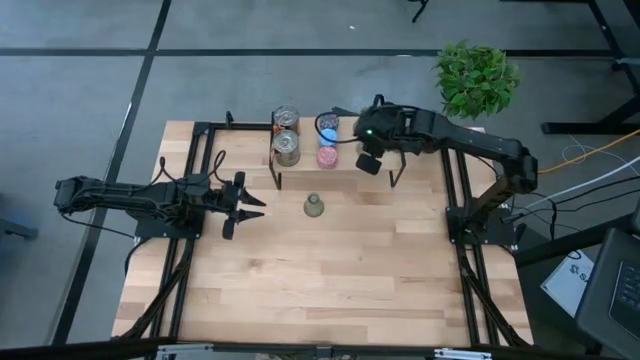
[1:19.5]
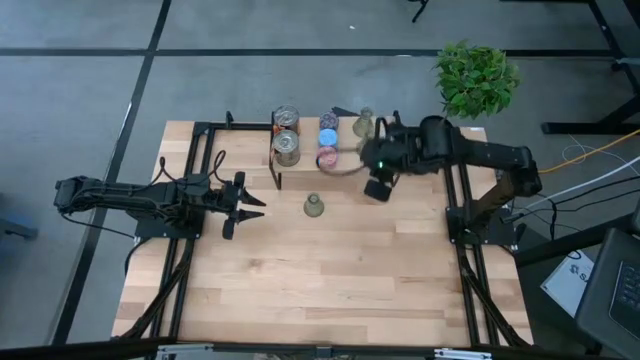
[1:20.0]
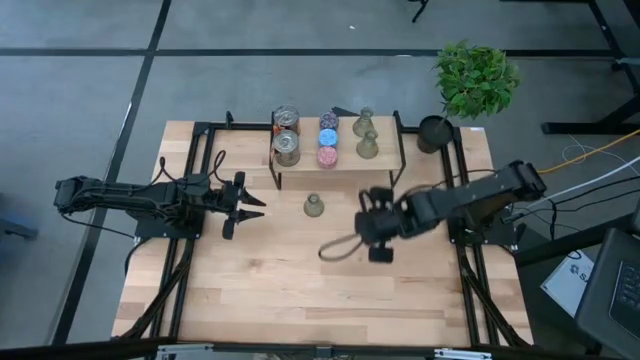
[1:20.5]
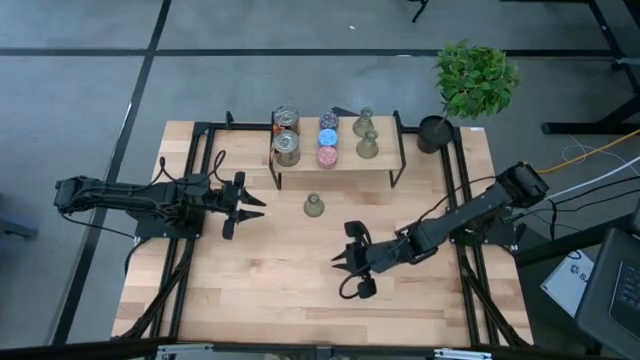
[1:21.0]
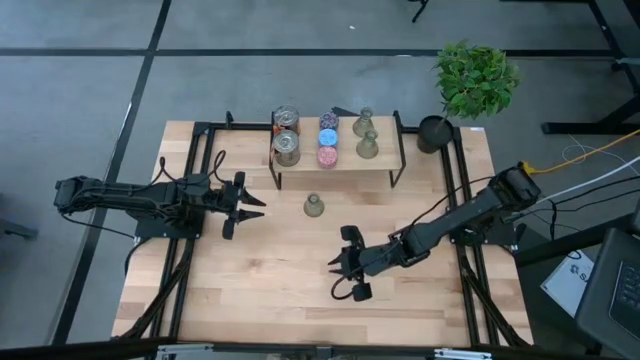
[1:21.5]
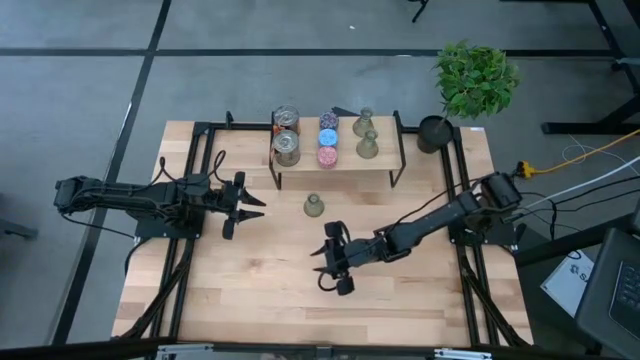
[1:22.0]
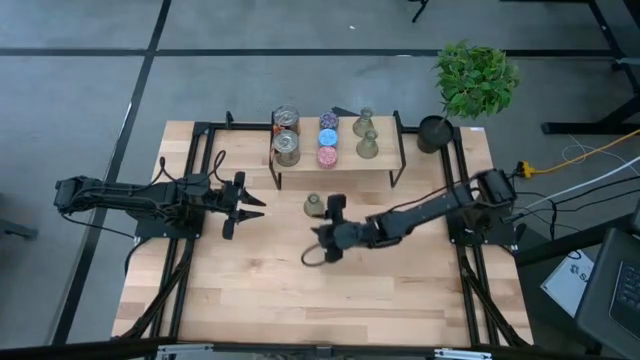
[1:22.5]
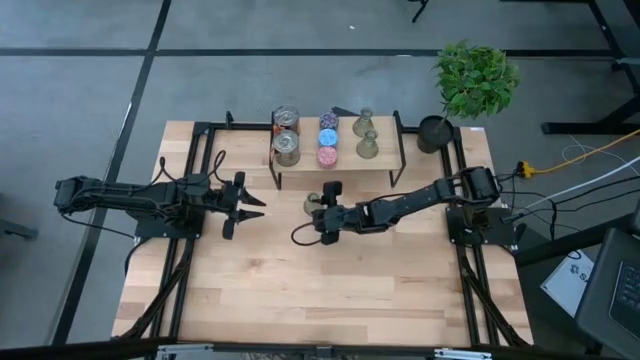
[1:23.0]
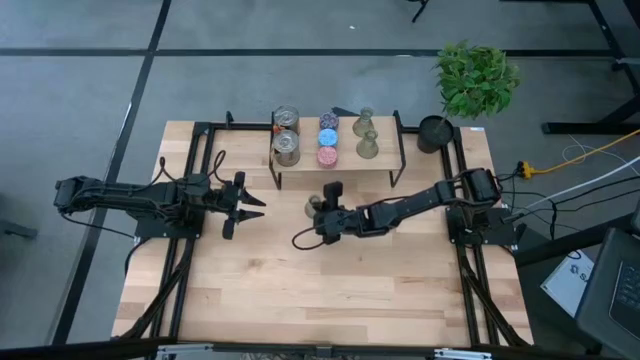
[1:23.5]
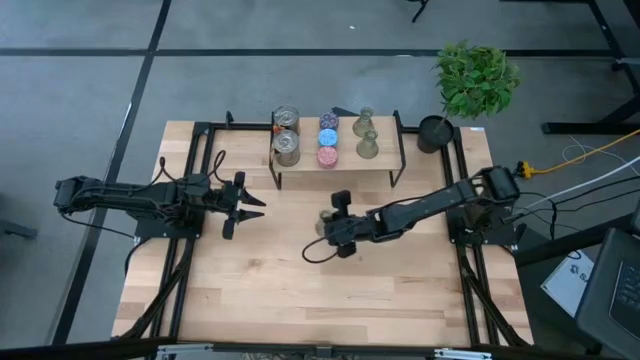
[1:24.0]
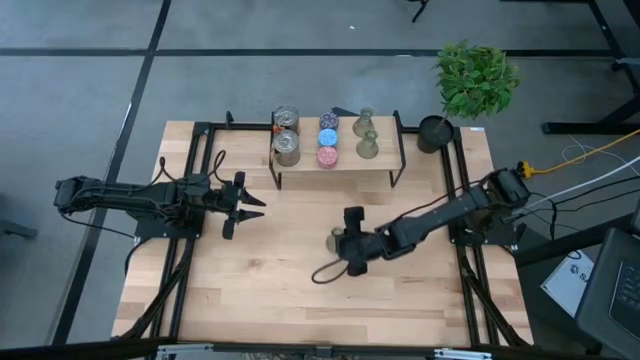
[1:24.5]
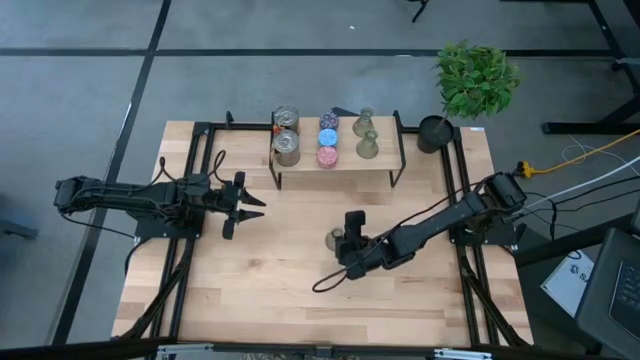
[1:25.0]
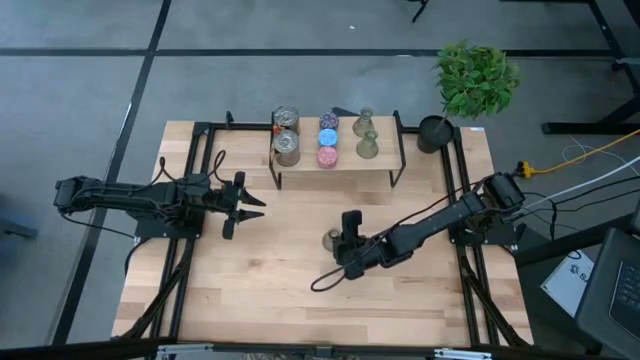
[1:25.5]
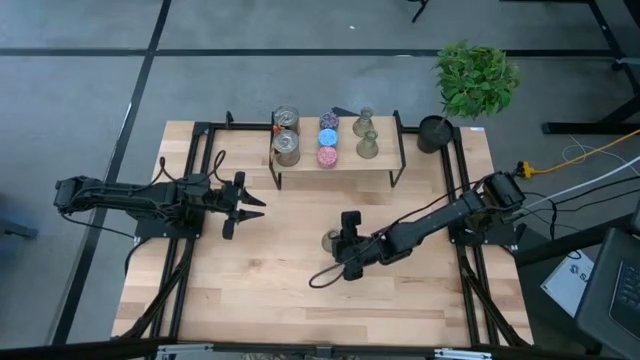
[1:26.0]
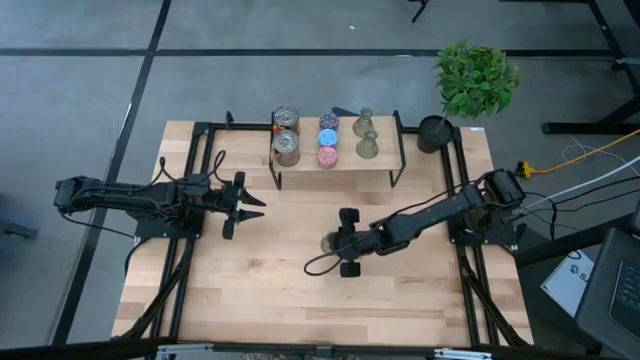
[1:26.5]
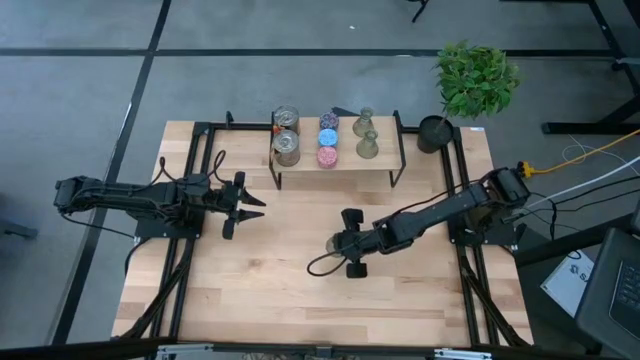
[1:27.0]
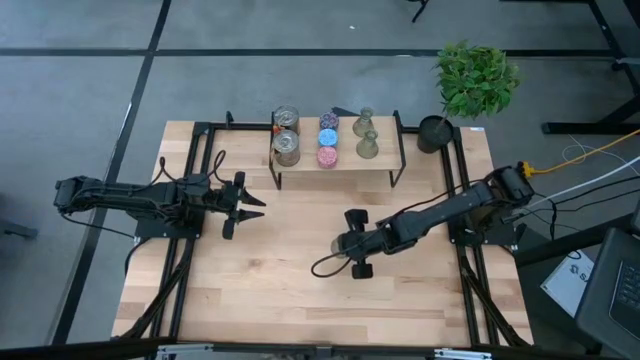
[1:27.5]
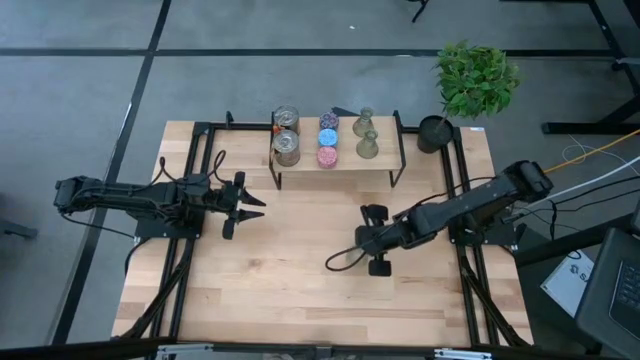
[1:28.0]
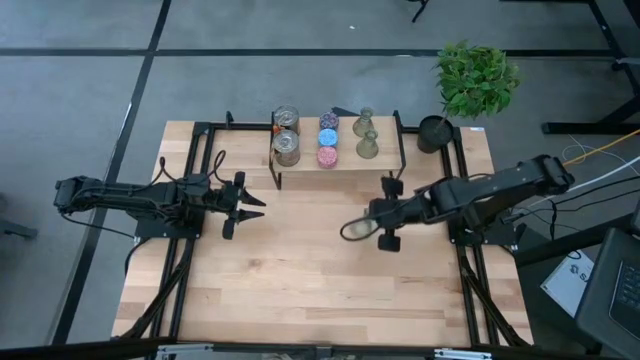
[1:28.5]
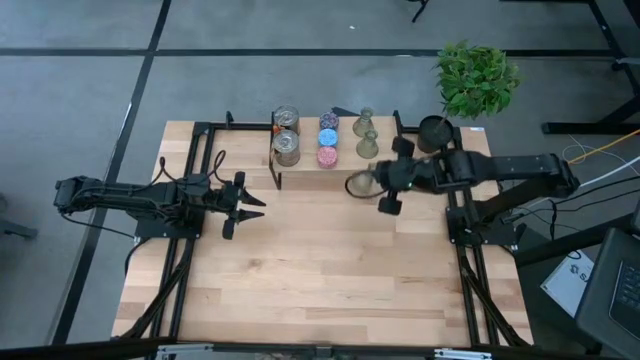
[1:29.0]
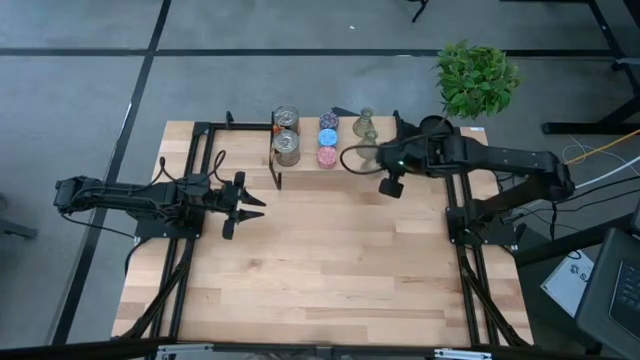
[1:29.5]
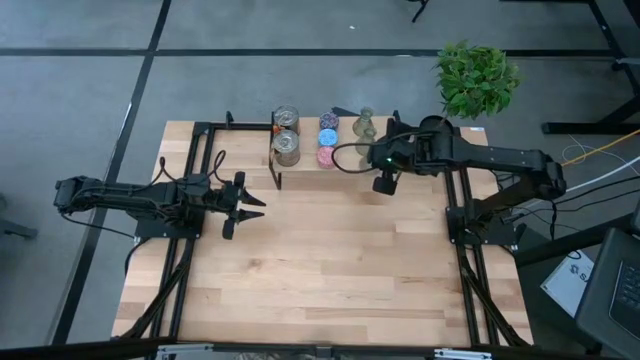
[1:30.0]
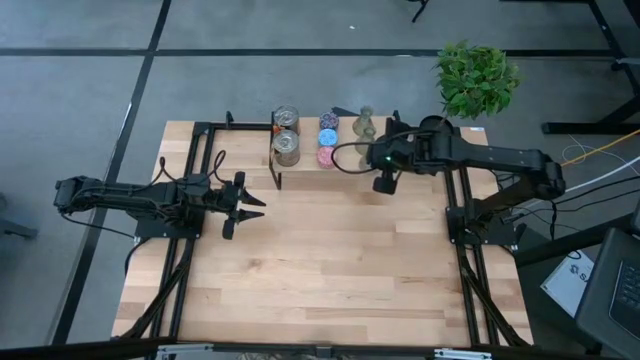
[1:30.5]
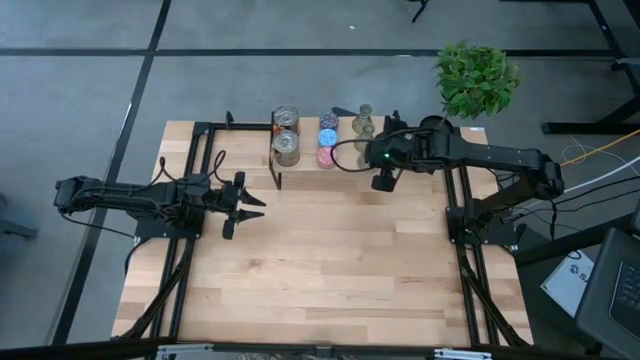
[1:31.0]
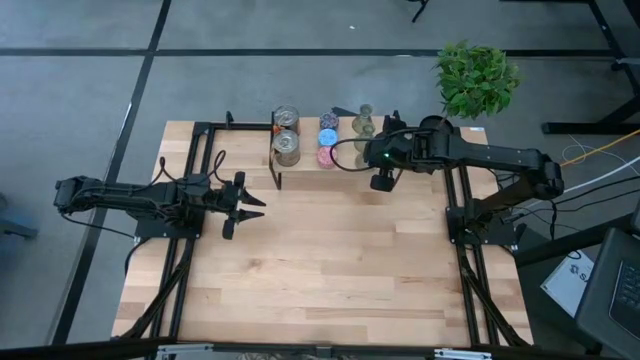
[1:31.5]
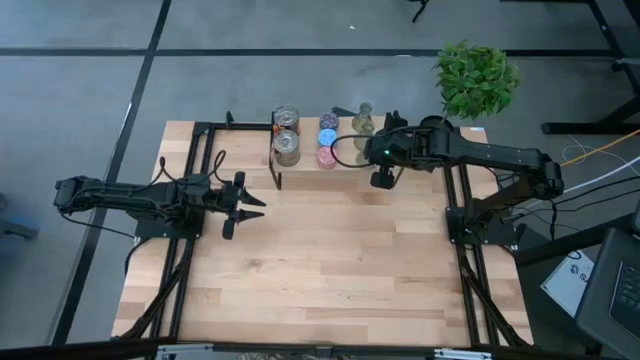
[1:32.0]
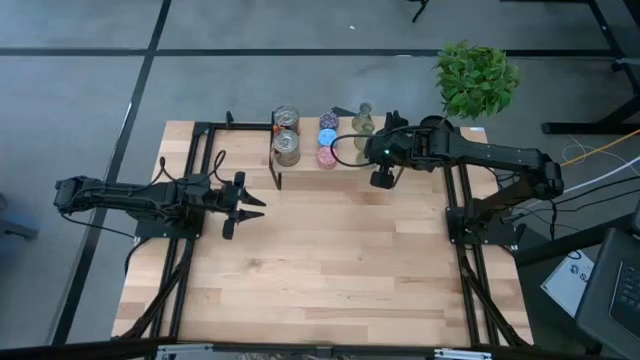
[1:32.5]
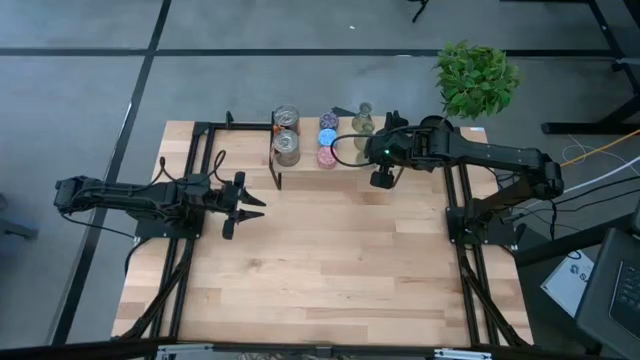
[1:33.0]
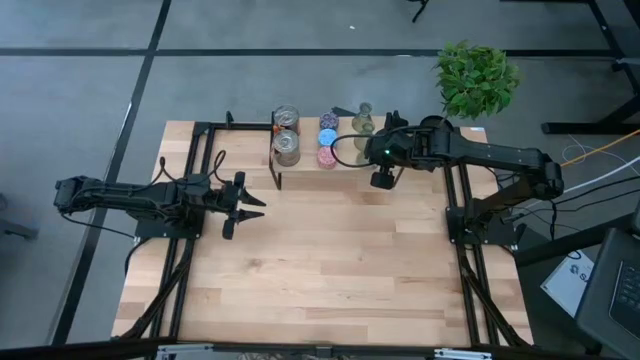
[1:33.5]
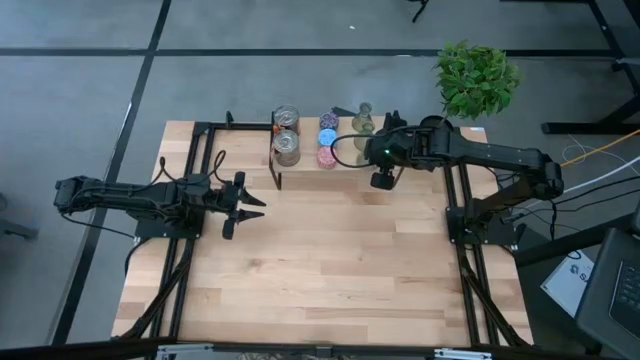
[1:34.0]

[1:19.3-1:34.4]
Task: Pick & Place candle stick holders
Put the green glass candle holder on the shelf aligned with the other green glass candle holders

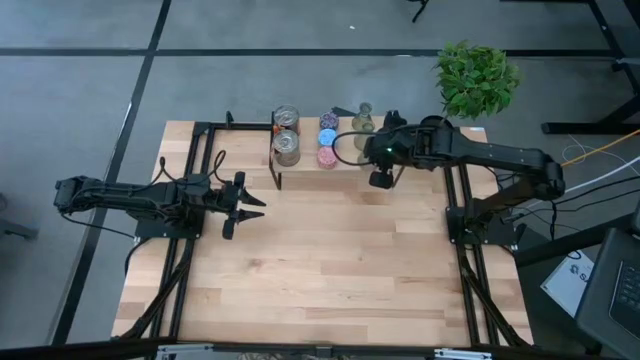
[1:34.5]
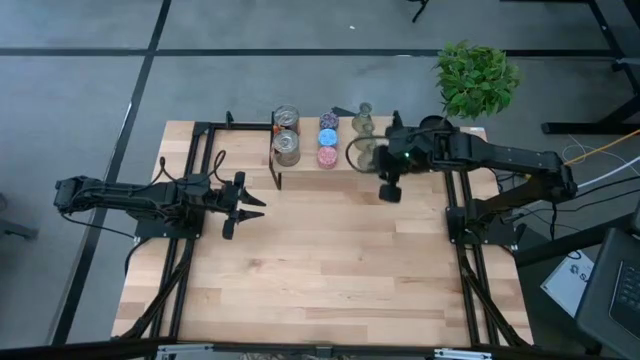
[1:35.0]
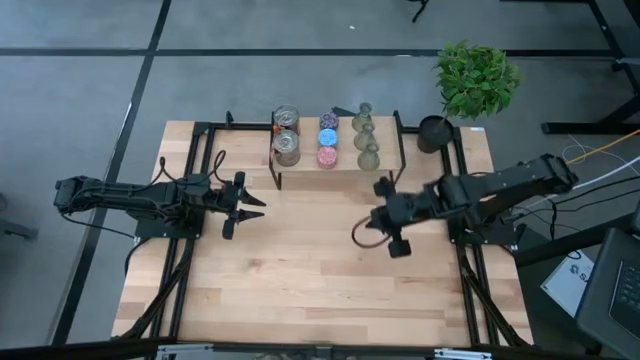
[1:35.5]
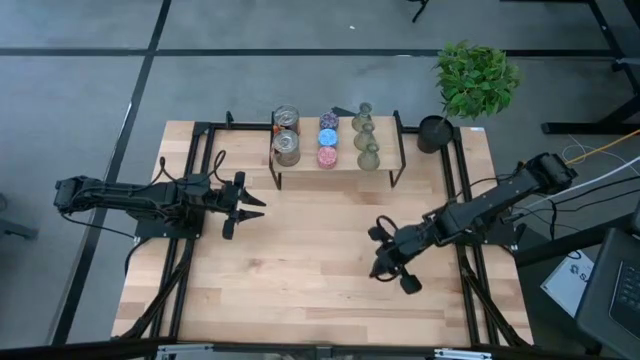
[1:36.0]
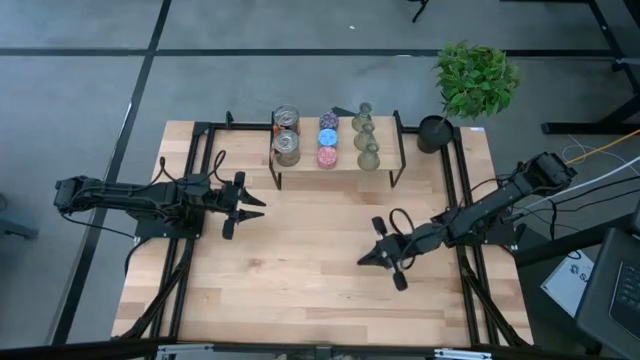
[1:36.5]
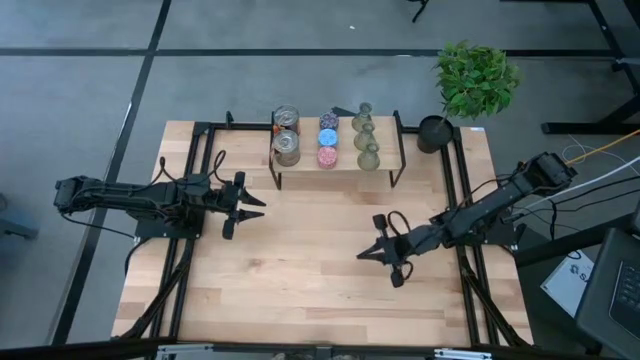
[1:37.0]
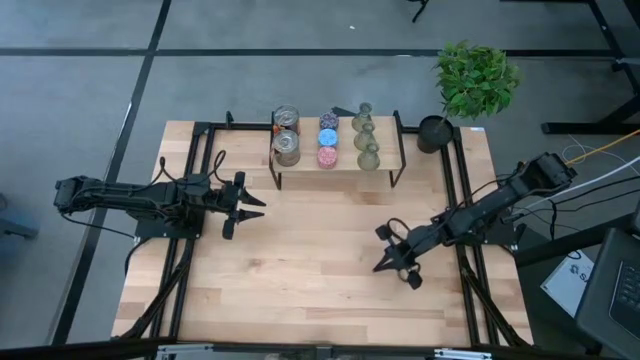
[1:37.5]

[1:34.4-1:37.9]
Return to Home Position

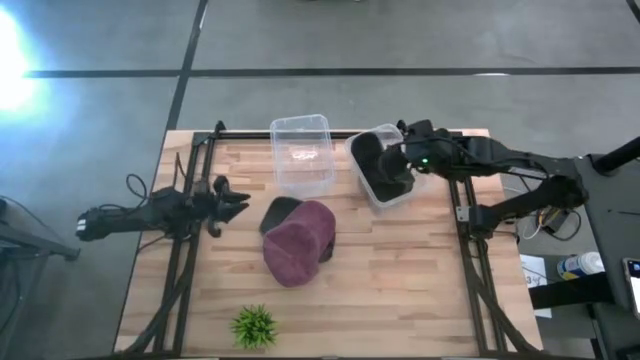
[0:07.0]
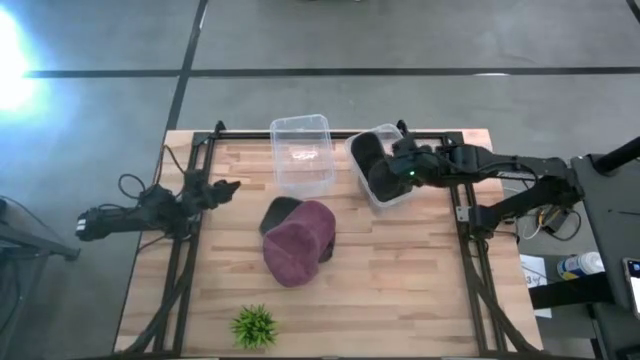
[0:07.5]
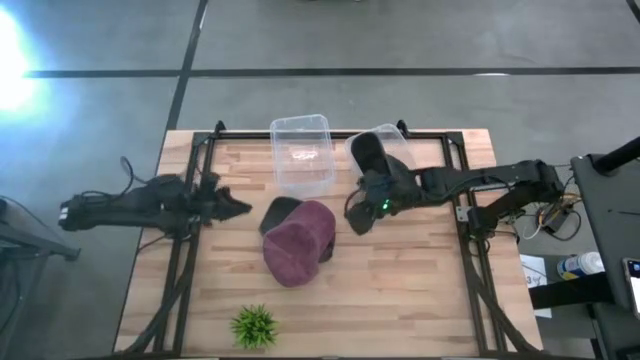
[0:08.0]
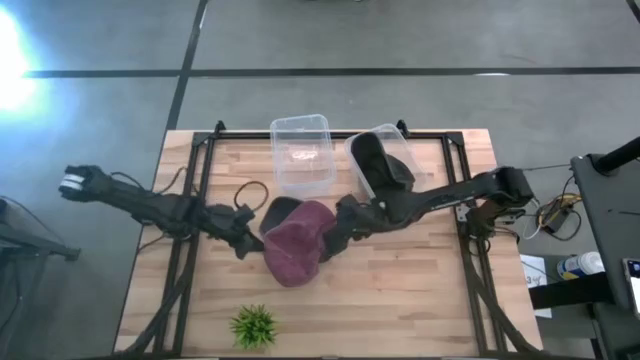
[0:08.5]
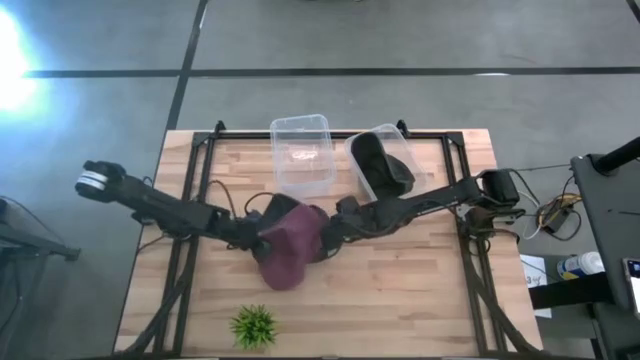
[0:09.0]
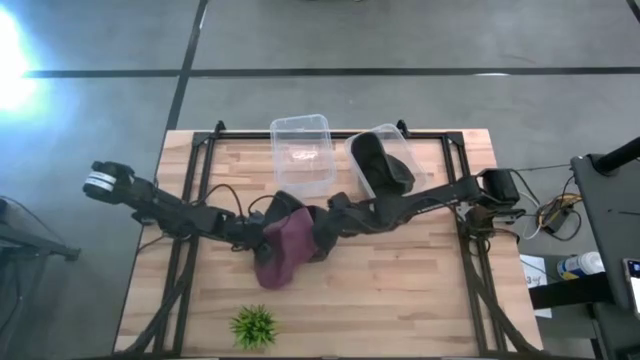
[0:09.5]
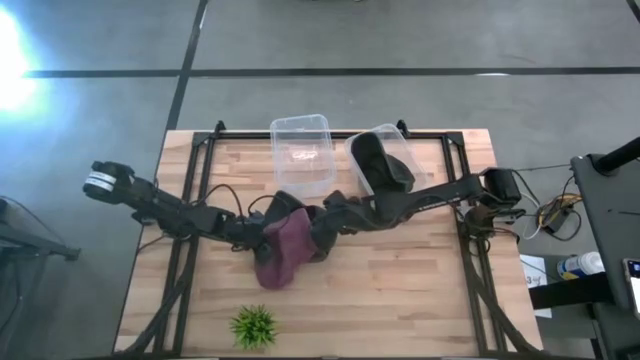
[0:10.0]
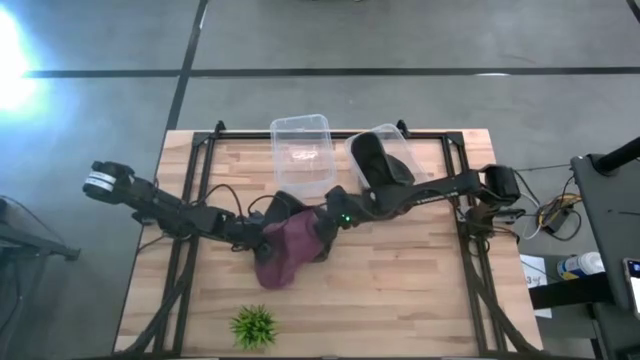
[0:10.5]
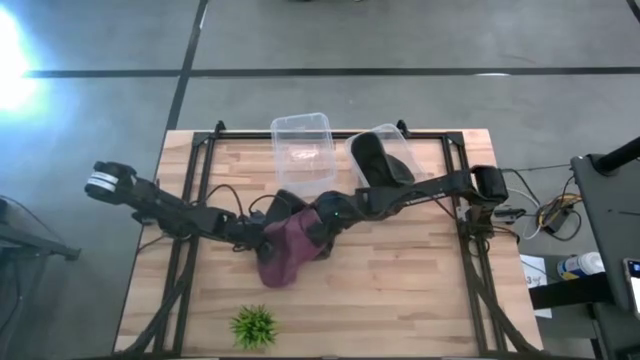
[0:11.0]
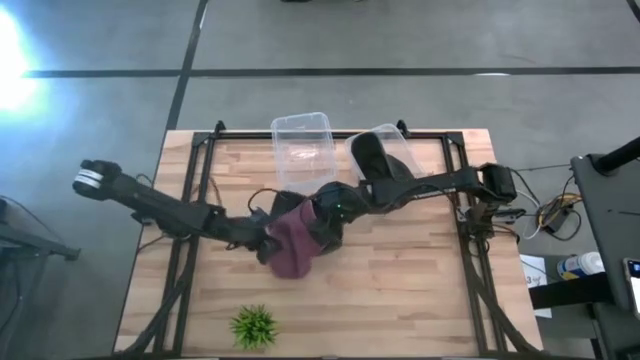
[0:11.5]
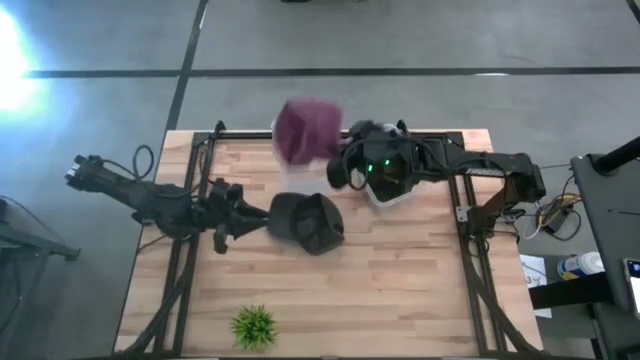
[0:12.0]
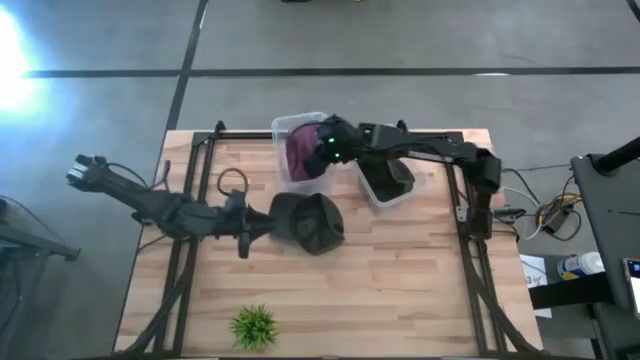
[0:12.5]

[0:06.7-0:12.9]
Task: Pick & Place hat
Put the red cap into the left transparent bin
